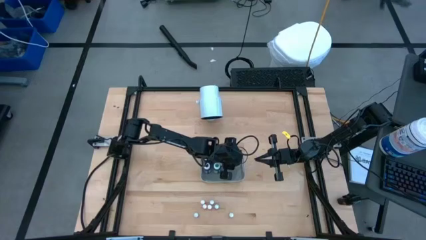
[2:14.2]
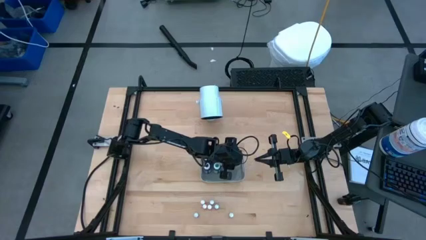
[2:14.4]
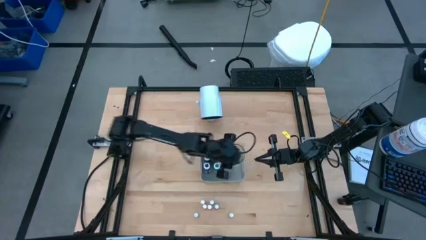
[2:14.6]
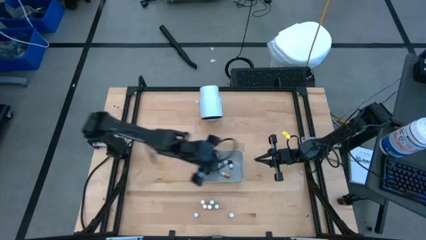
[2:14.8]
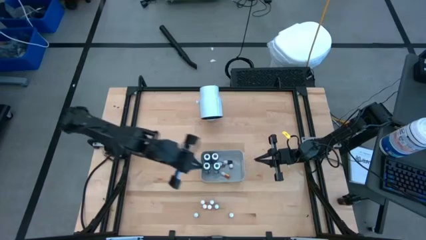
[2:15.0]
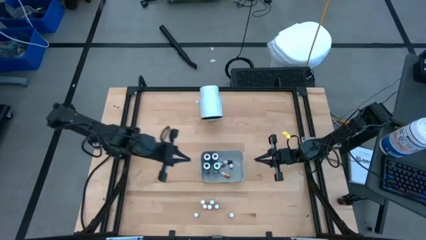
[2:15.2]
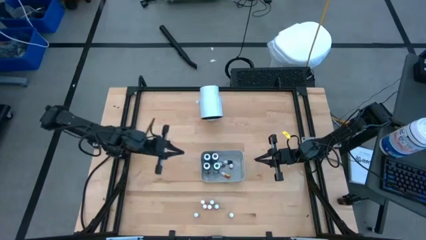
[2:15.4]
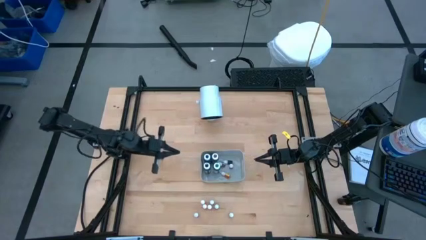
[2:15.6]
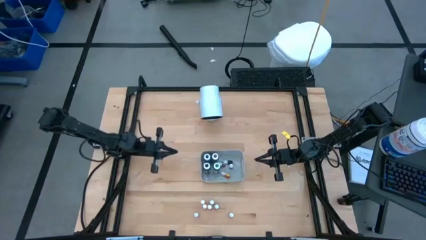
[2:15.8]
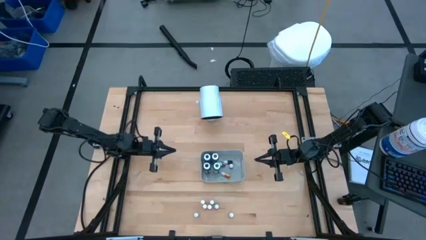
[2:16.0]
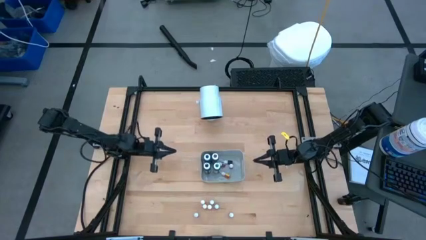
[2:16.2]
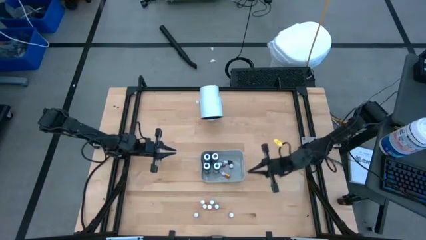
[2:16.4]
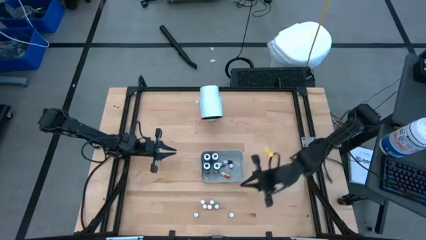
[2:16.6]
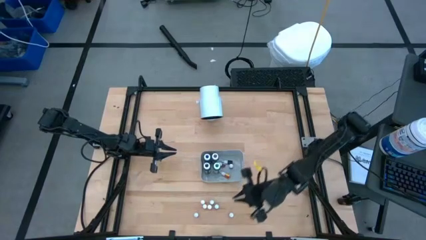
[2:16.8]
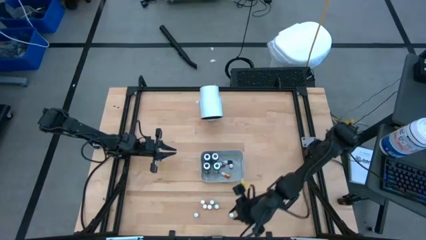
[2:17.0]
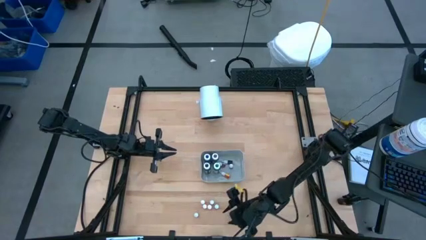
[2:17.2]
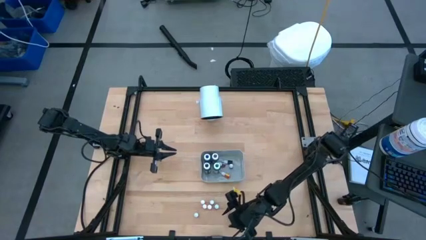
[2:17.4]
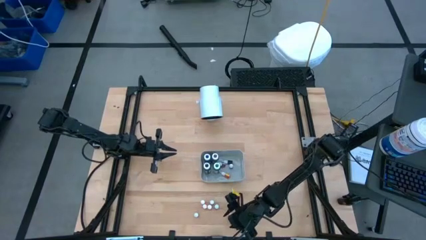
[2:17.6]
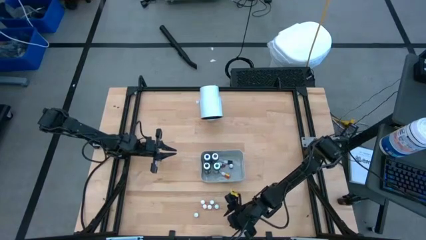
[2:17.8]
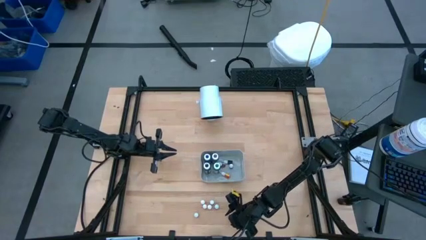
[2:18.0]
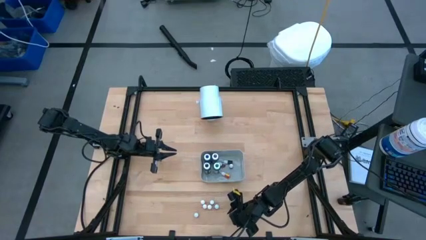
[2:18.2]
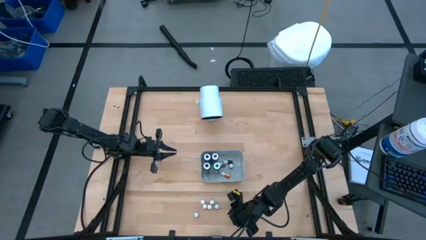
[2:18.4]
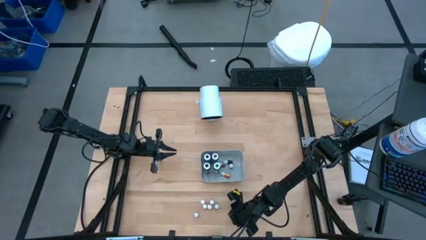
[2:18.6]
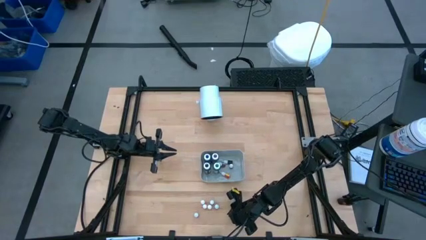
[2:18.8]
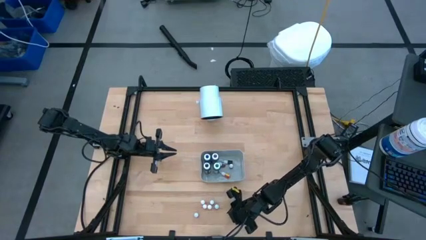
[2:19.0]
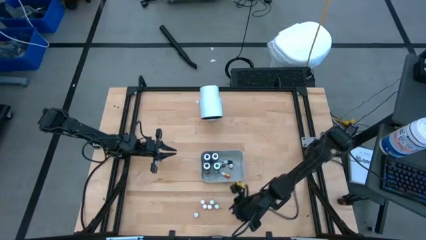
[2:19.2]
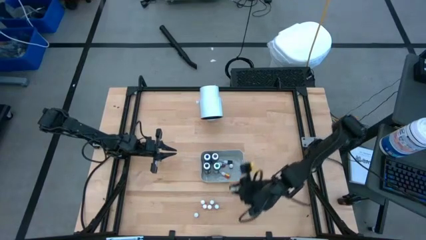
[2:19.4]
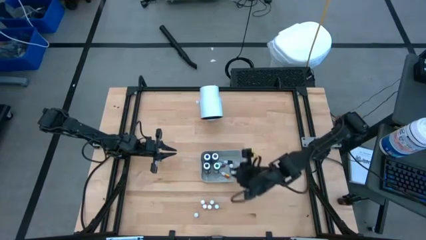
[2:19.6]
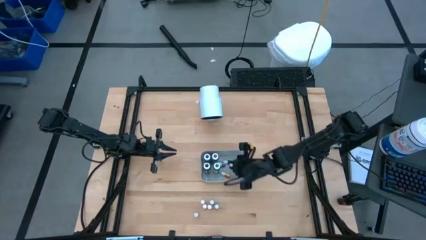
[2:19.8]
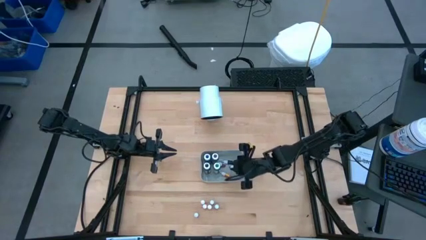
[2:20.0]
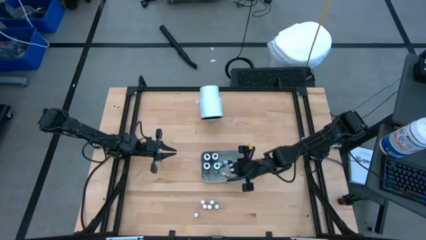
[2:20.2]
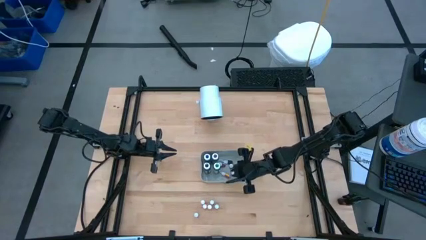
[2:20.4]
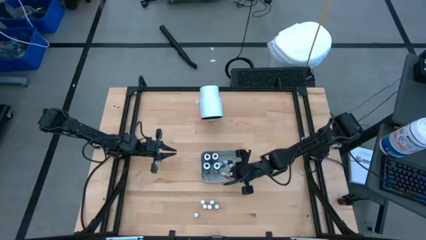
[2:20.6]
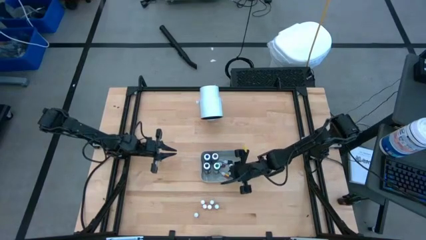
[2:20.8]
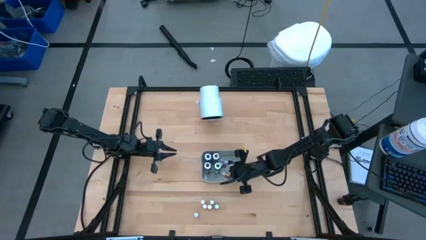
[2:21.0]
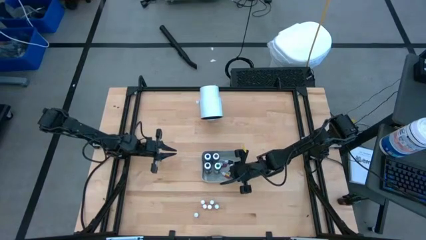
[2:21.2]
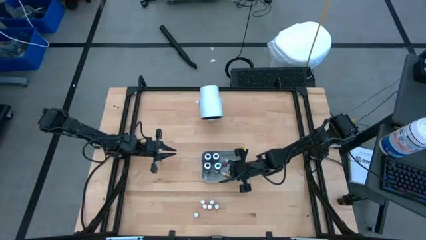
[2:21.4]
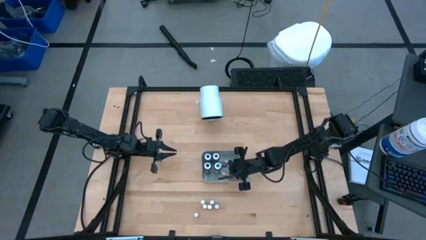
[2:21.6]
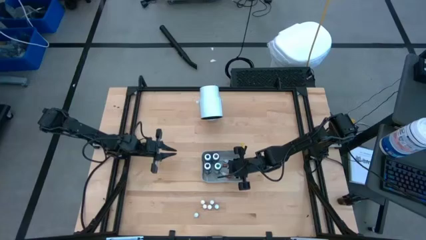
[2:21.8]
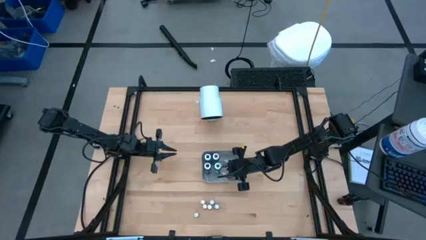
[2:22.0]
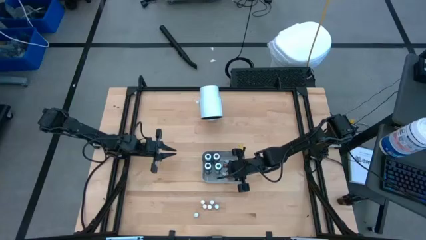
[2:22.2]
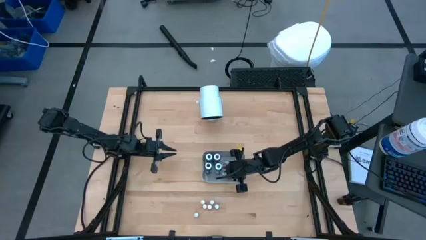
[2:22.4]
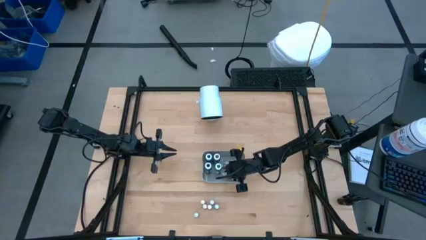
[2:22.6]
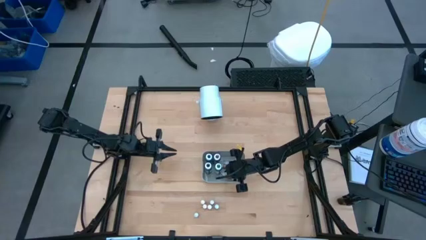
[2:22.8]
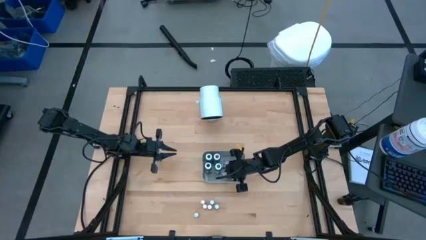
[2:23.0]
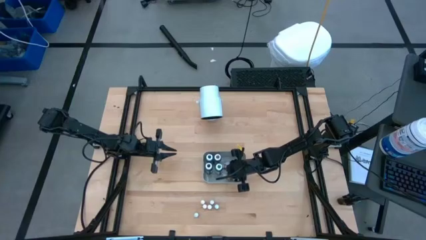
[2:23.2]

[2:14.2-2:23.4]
Task: Pick & Place food coloring
Put the small purple food coloring bottle into the gray bin

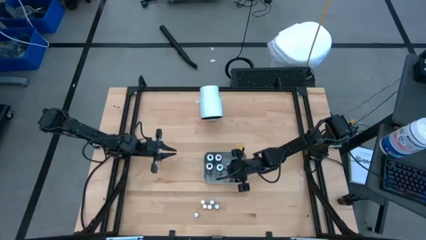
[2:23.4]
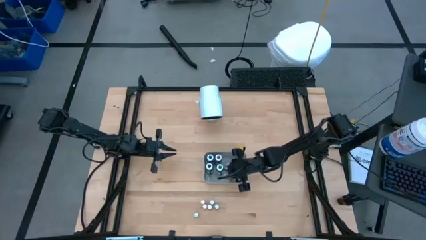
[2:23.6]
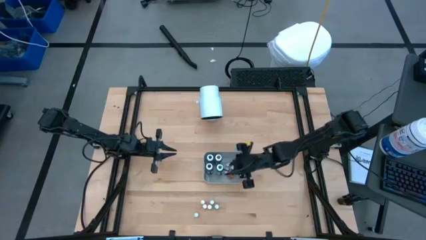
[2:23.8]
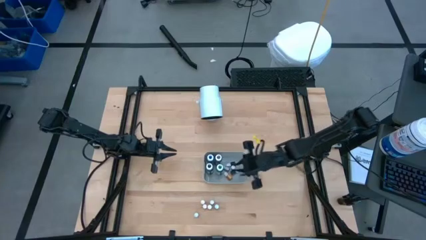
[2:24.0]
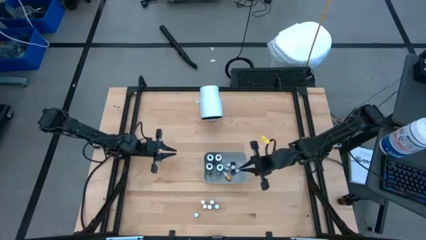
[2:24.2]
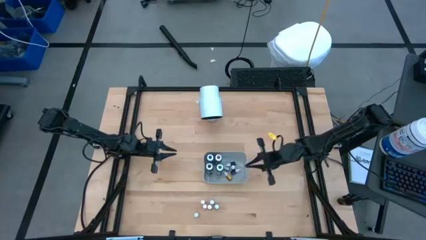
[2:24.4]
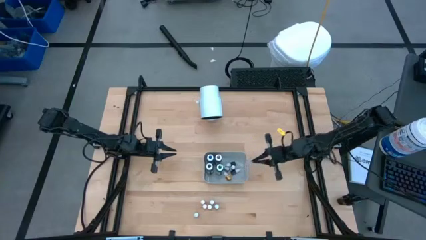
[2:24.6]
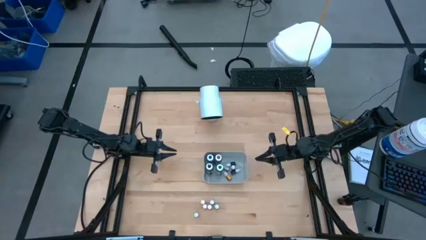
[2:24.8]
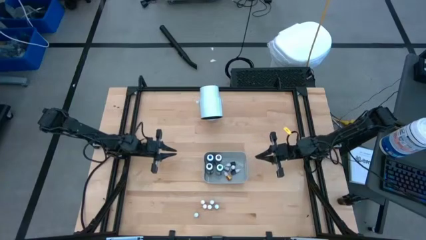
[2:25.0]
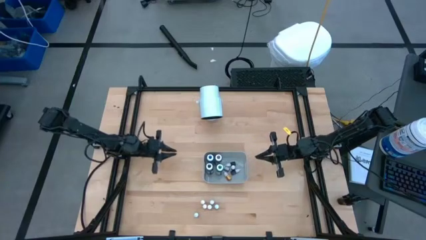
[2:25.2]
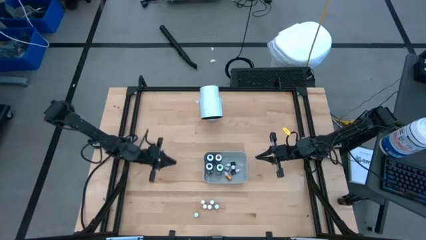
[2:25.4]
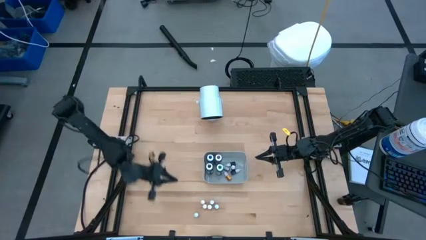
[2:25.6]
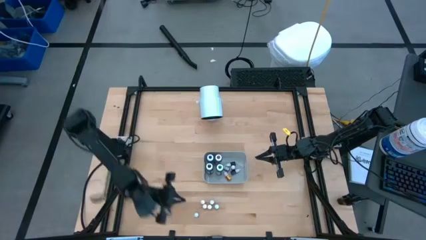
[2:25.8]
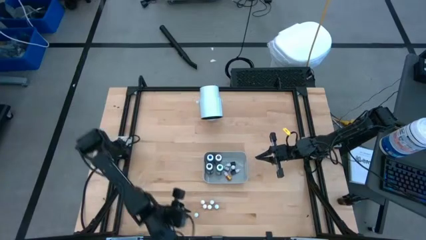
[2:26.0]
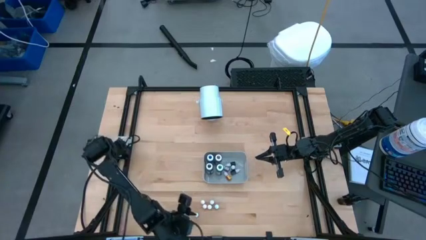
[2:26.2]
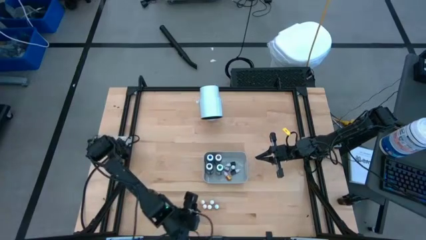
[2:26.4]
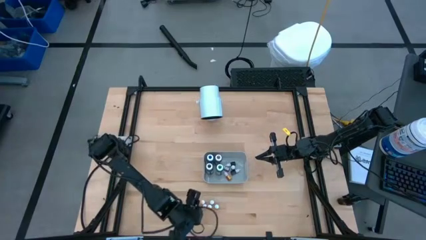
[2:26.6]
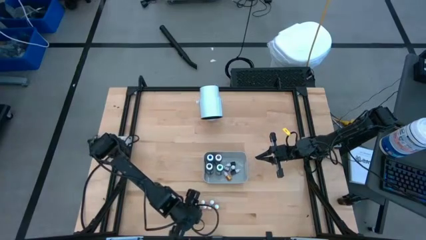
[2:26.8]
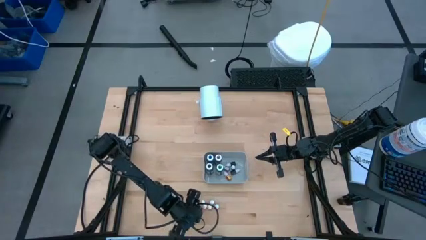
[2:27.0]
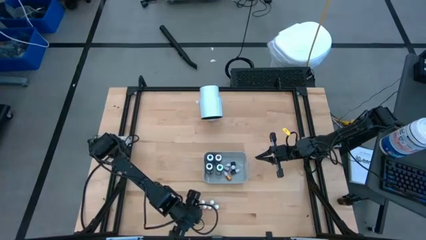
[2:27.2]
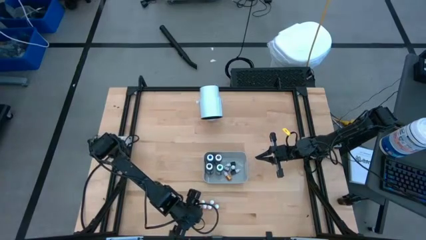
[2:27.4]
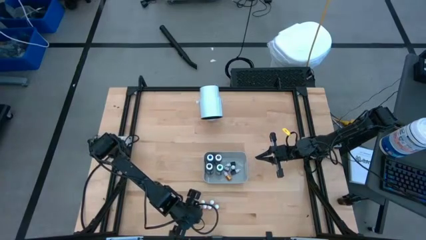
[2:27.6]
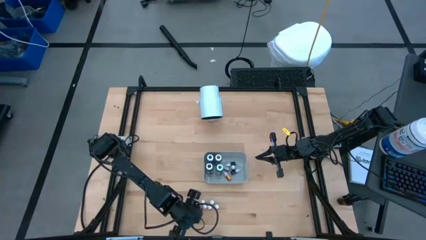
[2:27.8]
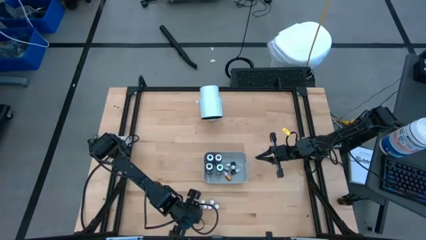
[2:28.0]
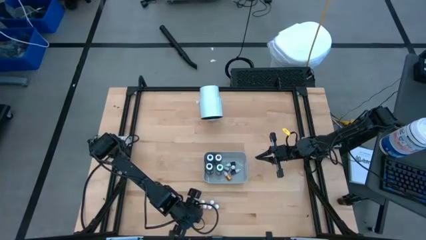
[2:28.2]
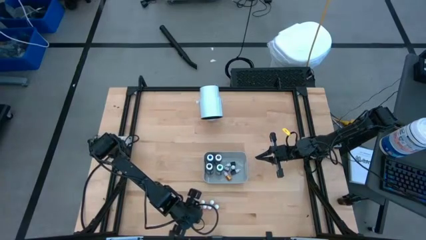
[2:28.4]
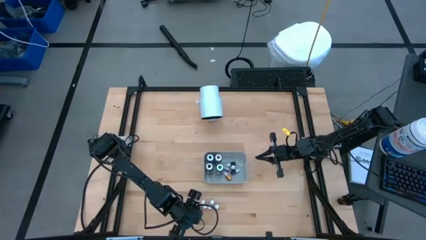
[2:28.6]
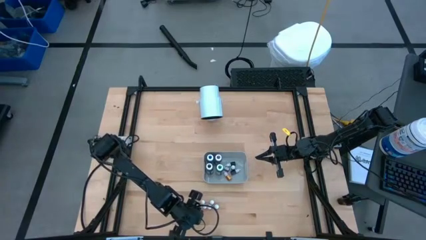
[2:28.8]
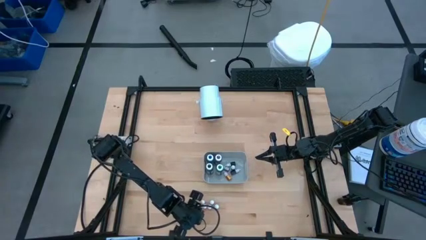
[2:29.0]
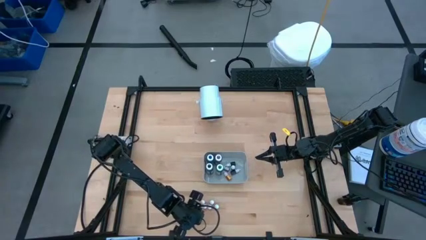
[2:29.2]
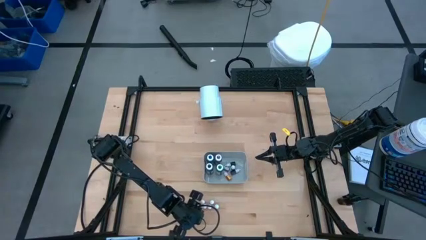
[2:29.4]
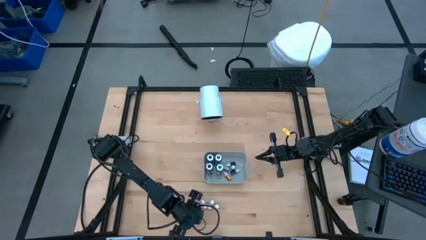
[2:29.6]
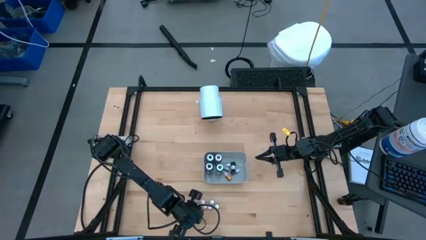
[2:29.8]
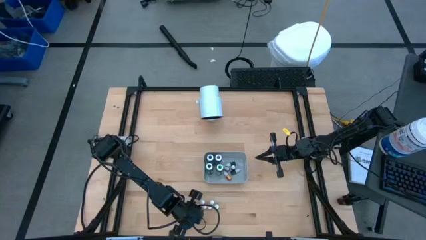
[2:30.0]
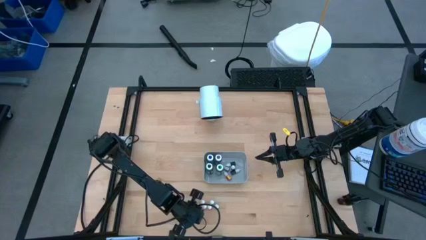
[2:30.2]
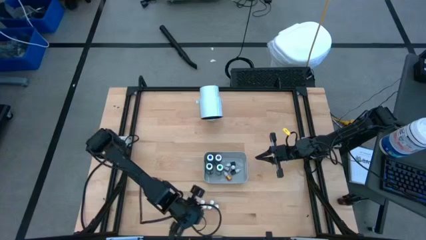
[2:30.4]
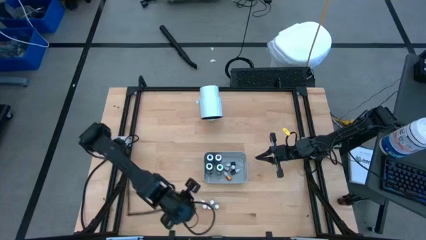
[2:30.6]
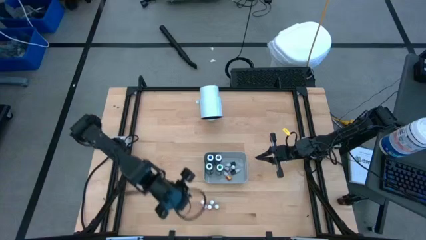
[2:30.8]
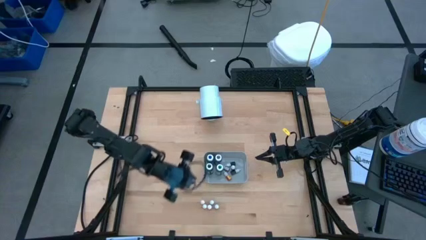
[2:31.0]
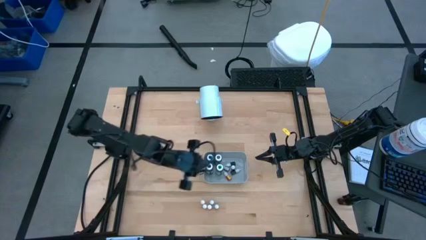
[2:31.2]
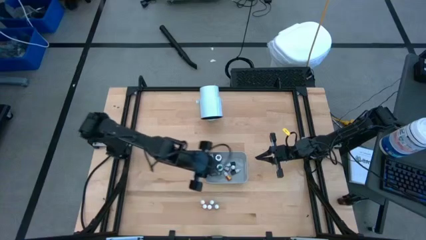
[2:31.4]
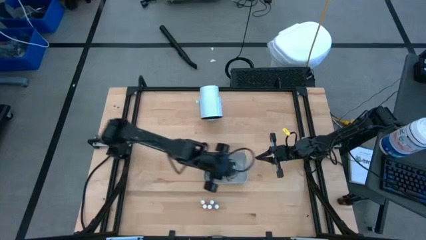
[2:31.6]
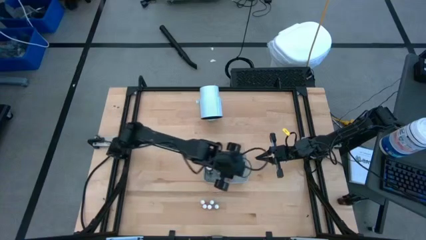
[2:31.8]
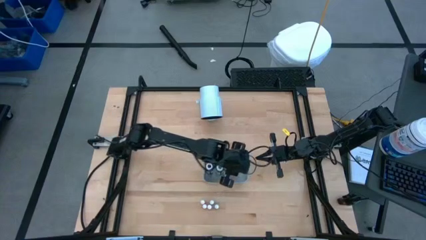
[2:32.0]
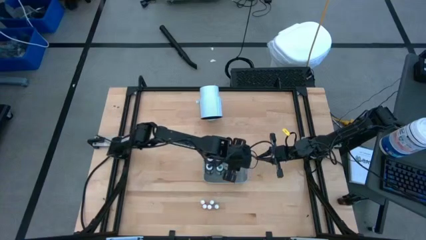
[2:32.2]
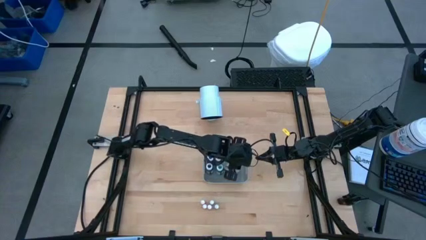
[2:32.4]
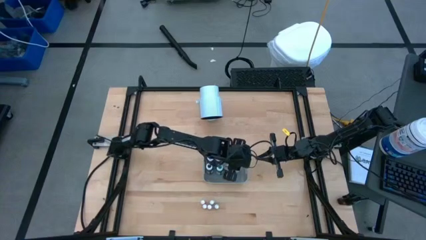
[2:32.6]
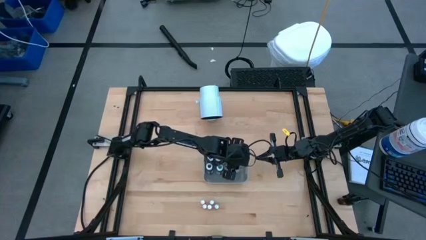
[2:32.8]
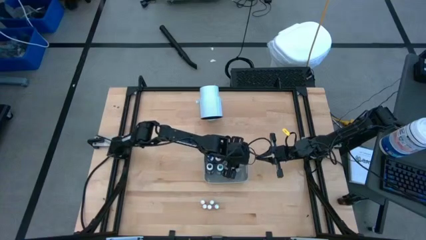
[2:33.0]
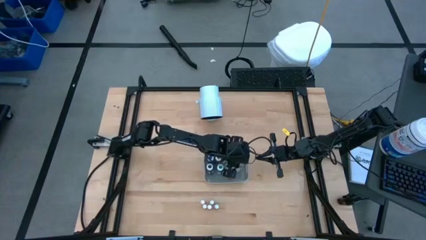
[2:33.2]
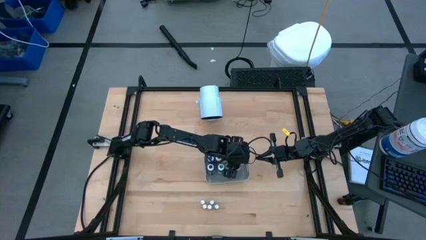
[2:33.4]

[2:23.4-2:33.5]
Put the small blue food coloring bottle into the gray bin
